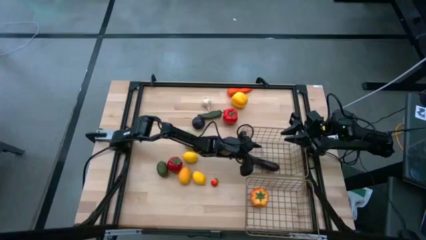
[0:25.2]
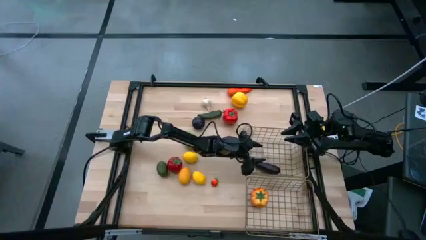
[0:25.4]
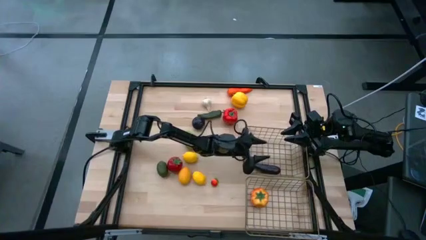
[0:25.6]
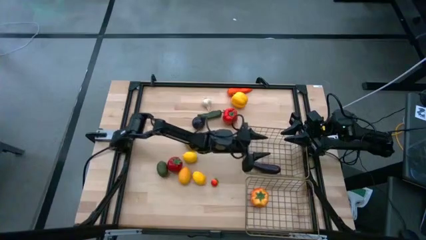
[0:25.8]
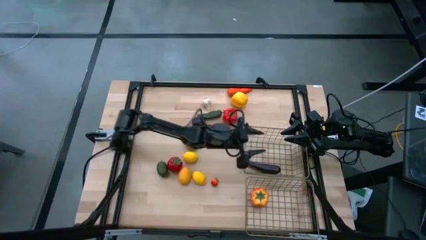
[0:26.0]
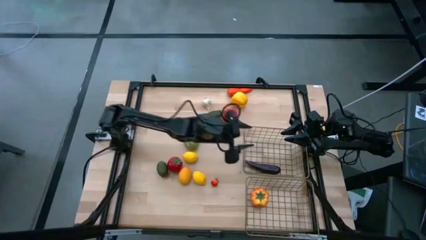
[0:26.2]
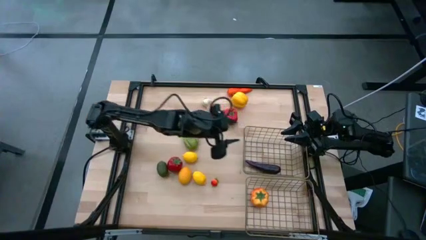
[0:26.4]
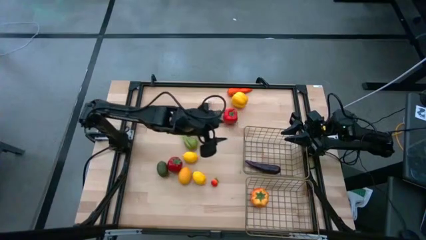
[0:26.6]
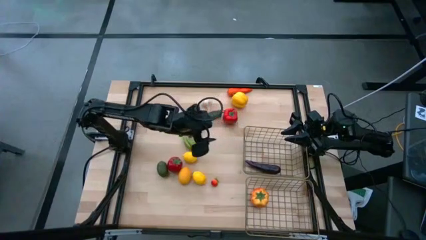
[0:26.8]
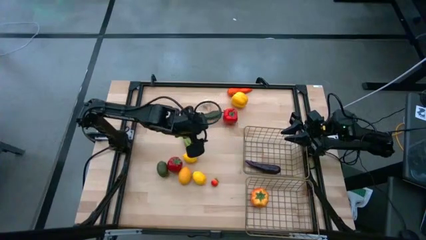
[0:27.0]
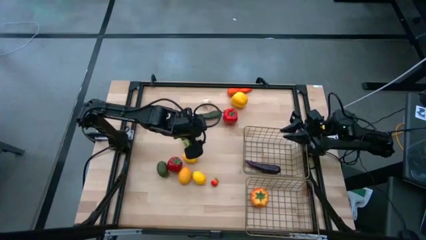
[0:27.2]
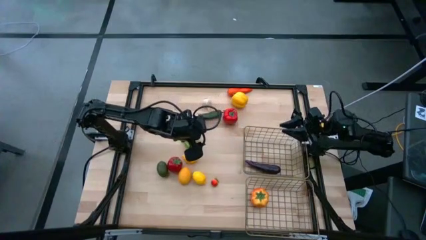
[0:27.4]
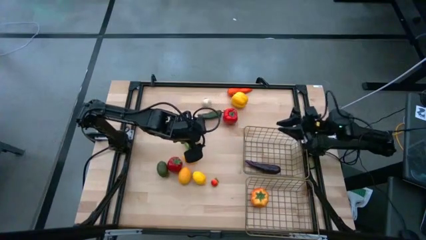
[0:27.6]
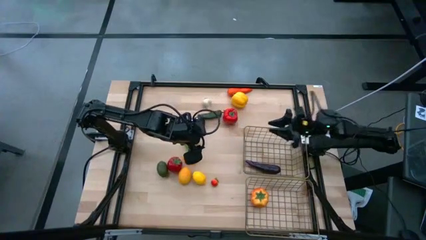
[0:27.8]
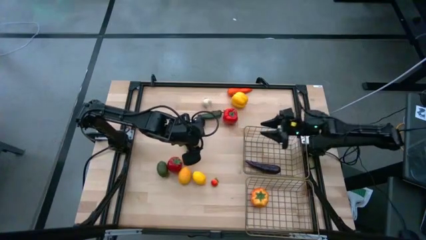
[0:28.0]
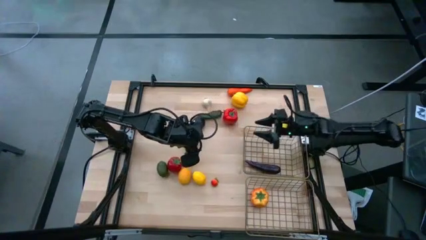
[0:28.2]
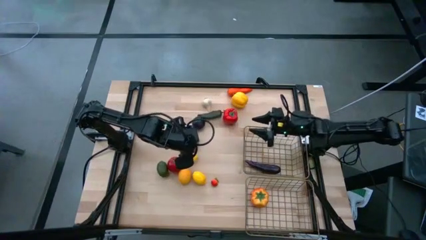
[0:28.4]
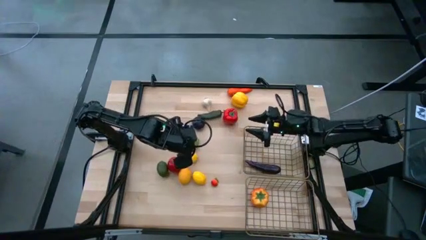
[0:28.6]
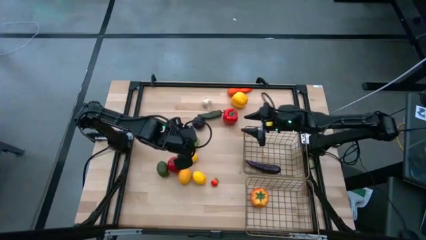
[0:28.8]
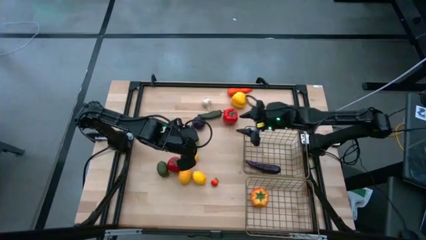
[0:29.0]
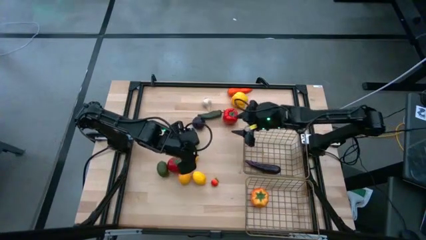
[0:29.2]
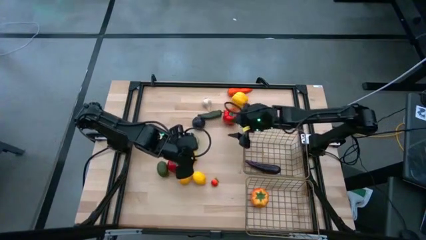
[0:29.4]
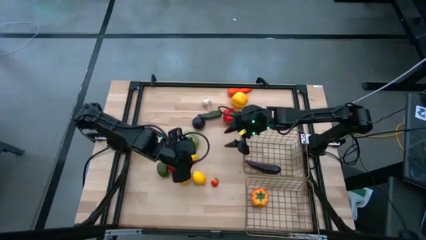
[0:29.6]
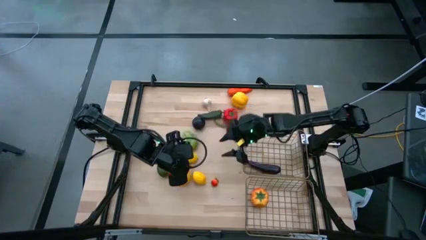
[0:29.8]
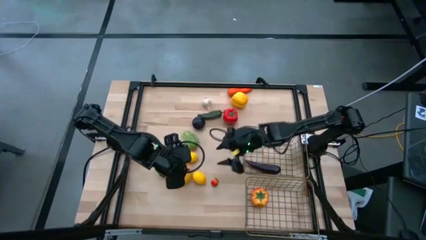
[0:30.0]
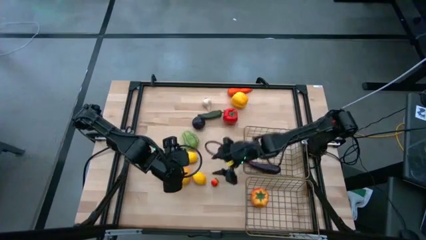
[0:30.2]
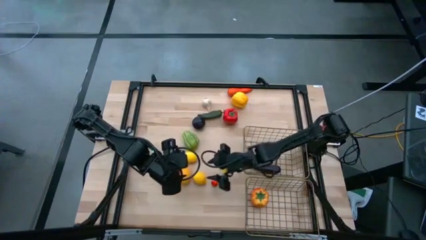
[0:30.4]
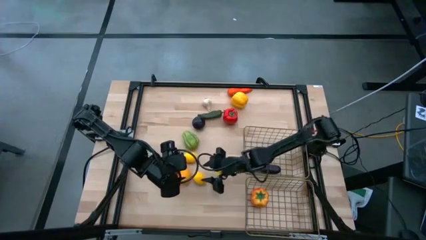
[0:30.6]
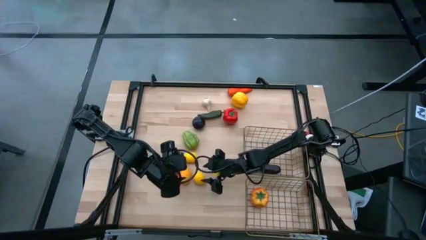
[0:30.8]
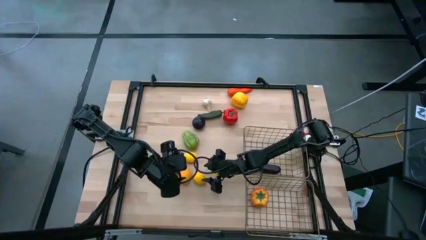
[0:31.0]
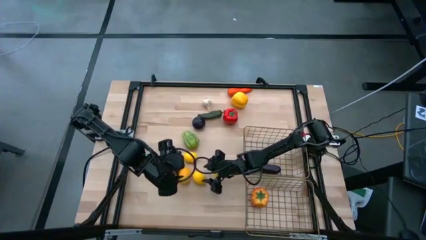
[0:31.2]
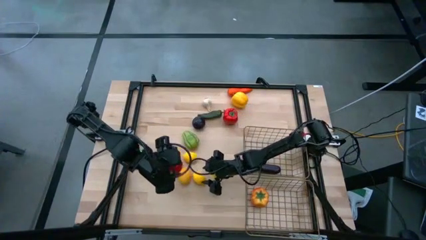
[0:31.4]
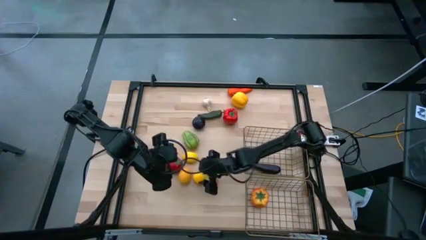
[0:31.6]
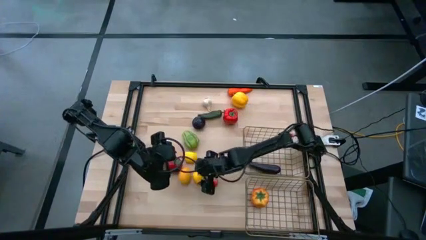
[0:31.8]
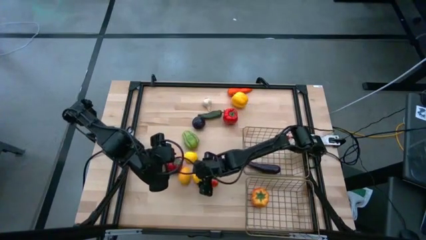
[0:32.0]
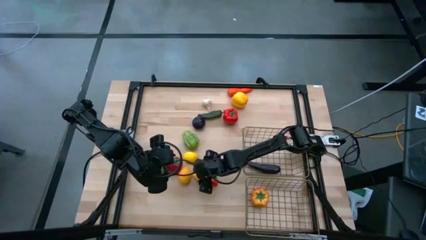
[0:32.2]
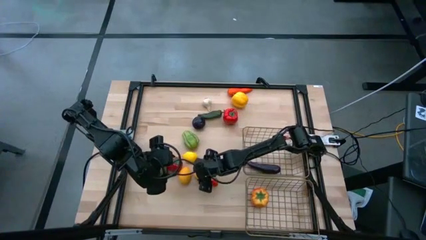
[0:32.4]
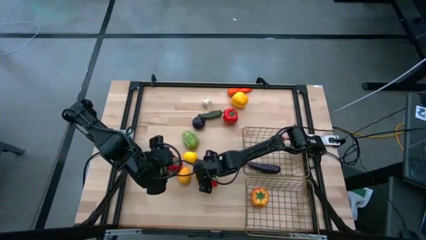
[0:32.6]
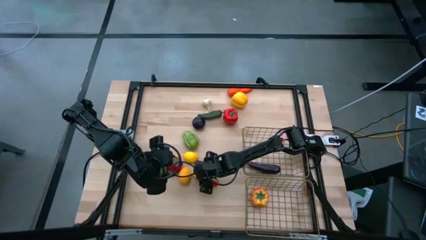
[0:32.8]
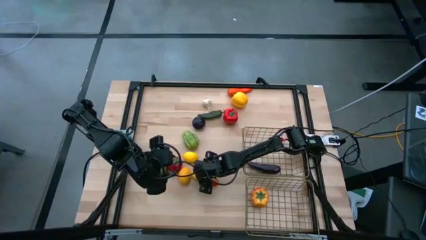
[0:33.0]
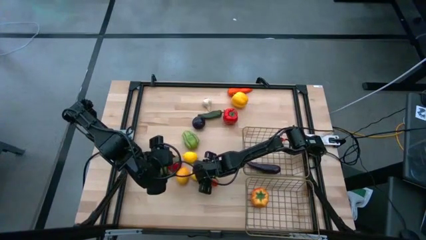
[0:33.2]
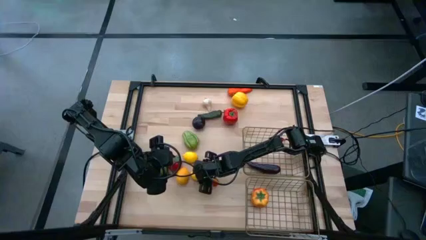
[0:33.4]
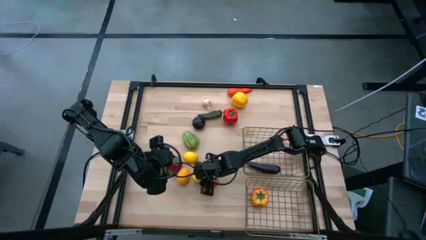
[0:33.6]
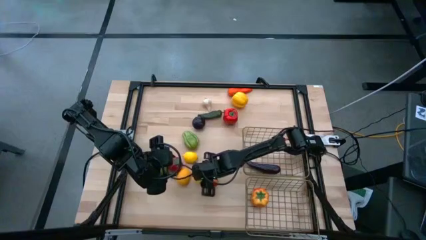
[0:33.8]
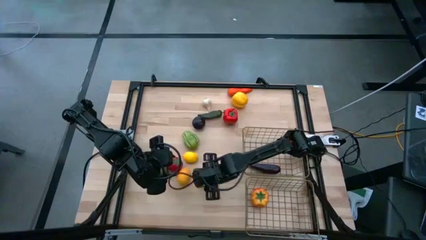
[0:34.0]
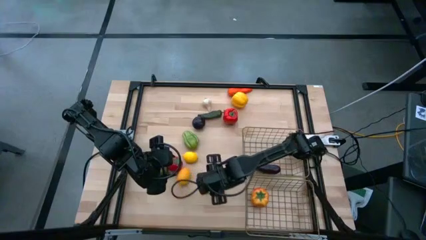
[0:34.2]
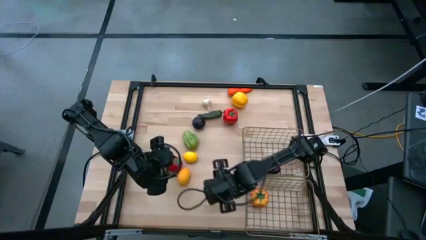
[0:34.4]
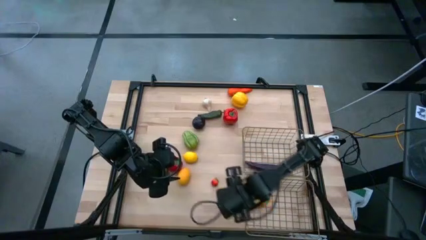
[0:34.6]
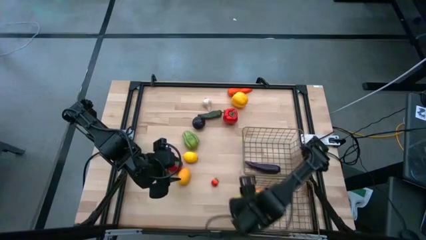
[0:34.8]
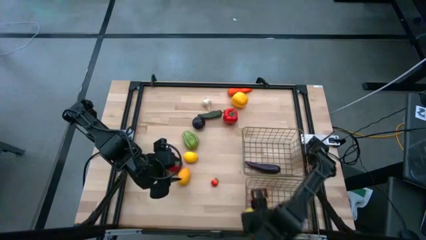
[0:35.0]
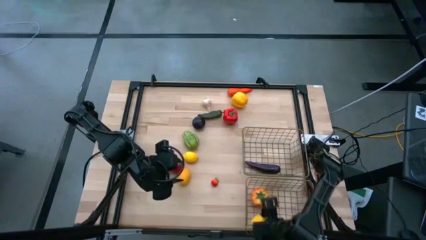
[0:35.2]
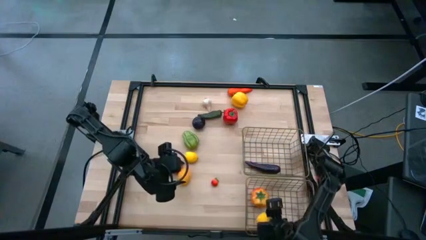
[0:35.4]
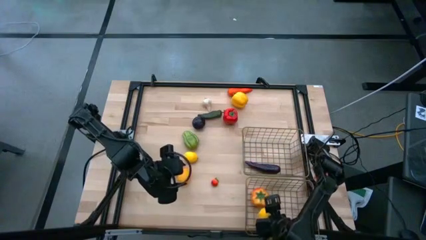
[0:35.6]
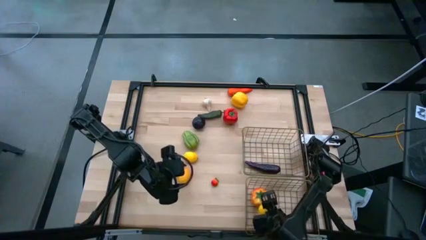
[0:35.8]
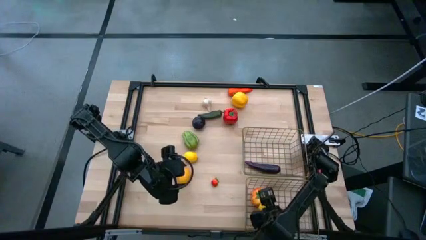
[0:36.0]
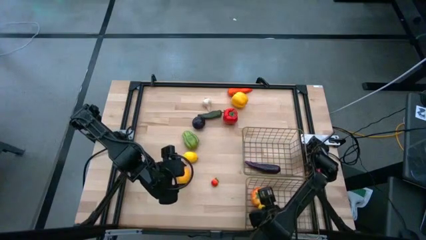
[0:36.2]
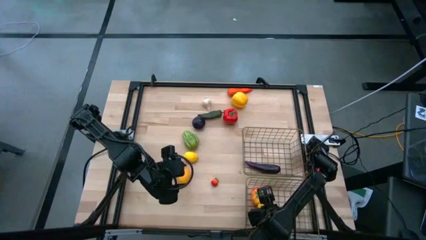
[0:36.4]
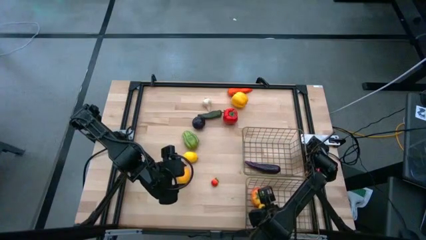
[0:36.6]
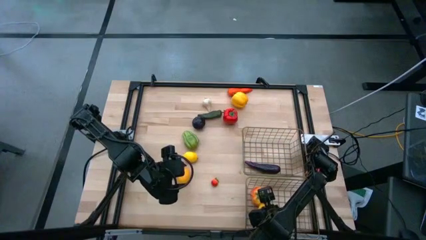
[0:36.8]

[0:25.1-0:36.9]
Task: Sort produce into baskets
Put the bottom right lemon into the bottom wire basket

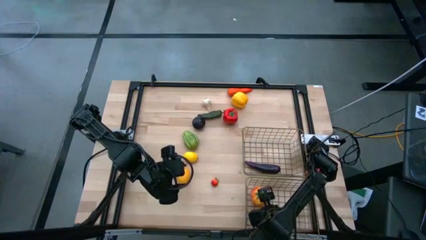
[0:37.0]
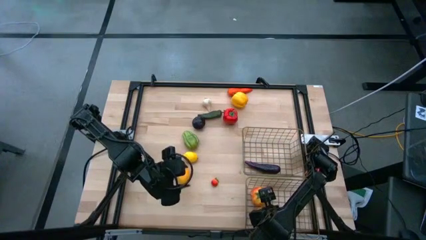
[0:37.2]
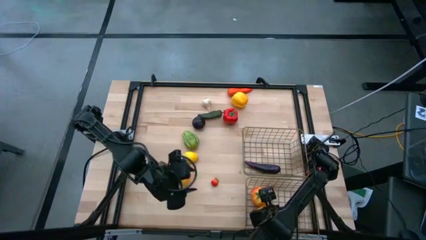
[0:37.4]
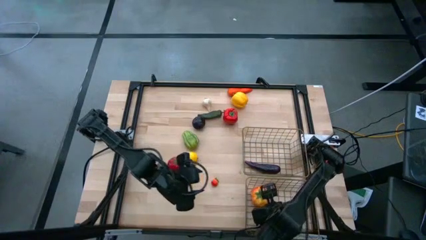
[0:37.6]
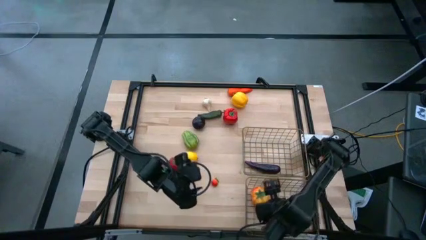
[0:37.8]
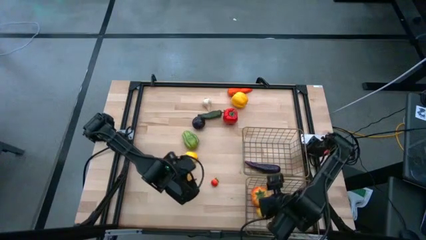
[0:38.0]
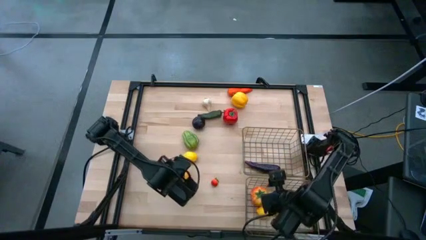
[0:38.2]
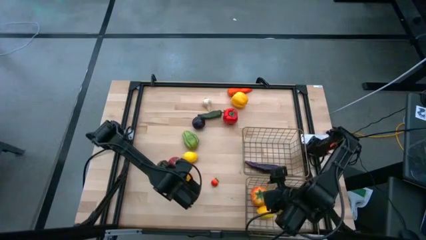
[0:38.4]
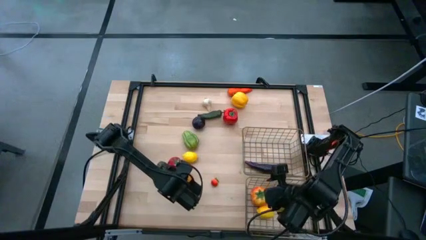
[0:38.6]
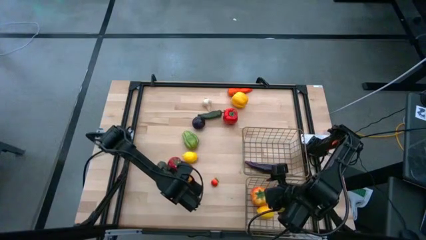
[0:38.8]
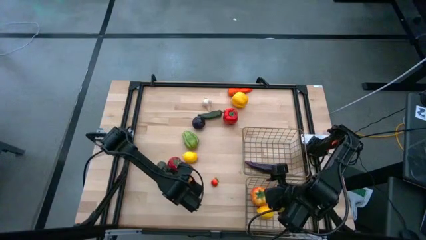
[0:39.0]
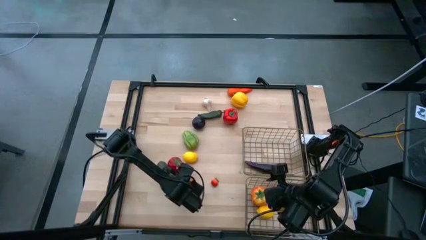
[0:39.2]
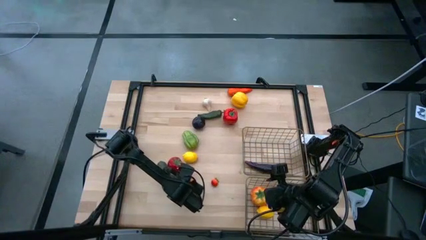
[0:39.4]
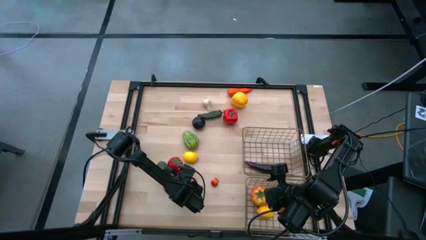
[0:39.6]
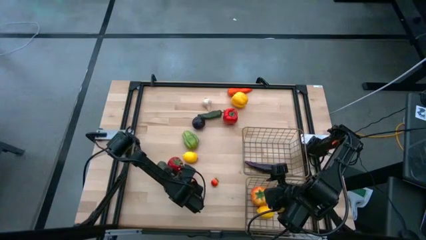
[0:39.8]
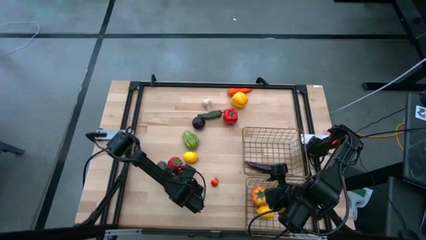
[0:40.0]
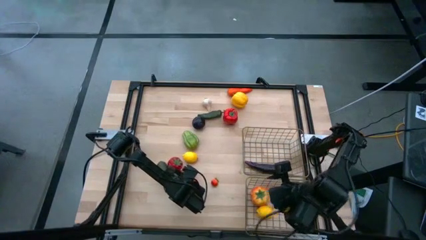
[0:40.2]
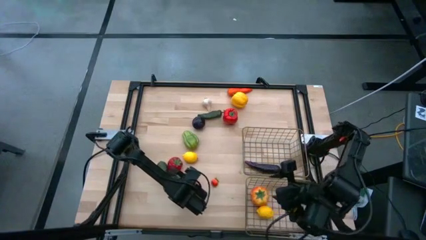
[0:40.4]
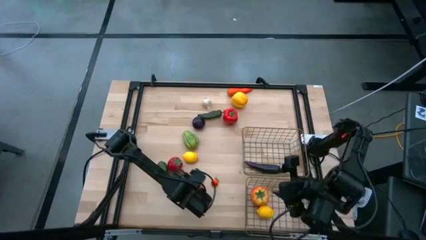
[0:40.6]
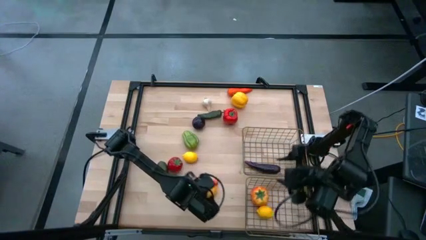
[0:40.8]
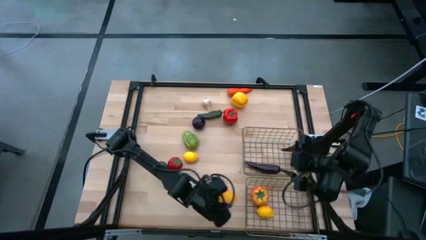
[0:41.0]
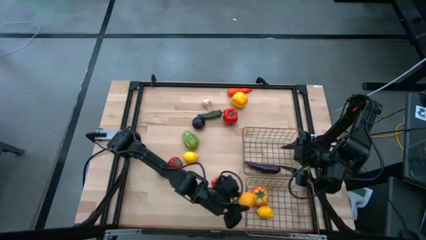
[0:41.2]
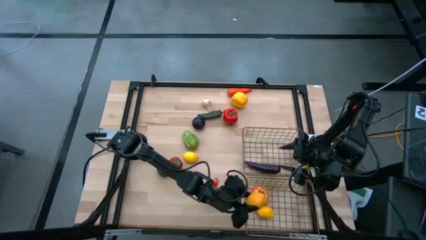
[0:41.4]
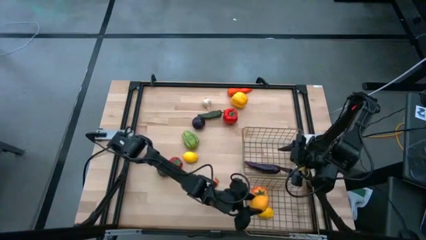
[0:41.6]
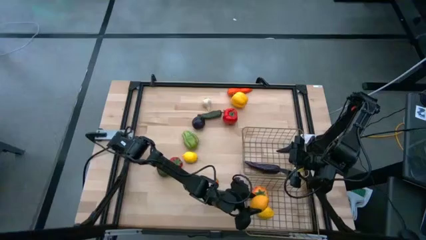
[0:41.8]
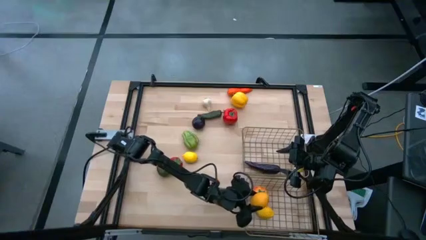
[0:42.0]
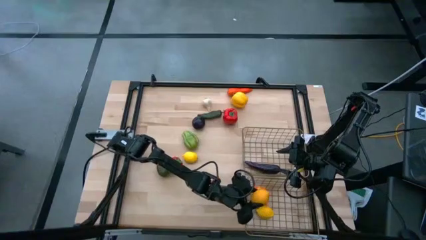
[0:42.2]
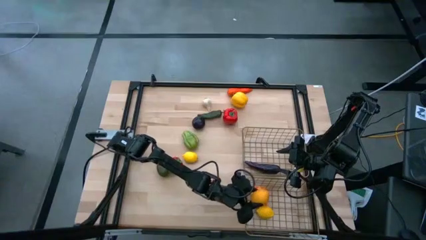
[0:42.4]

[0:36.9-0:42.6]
Put the bottom lemon into the bottom wire basket
